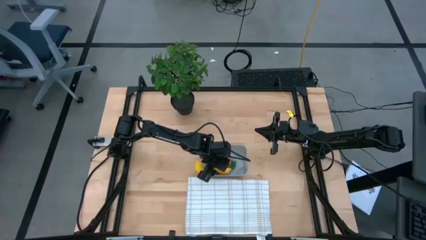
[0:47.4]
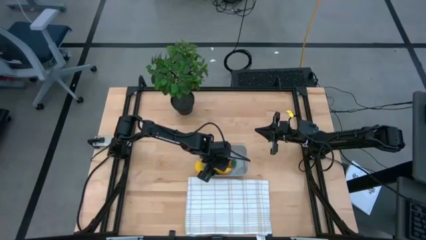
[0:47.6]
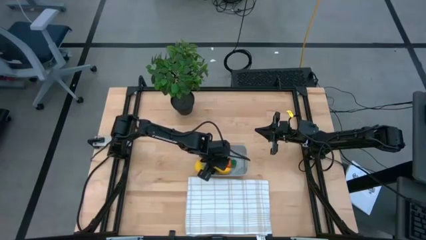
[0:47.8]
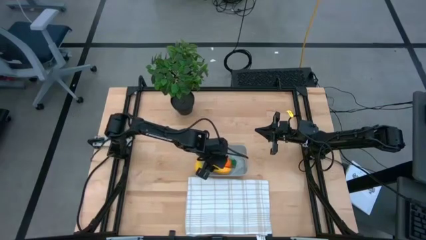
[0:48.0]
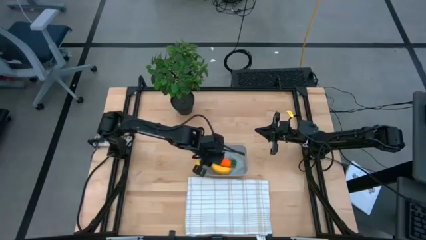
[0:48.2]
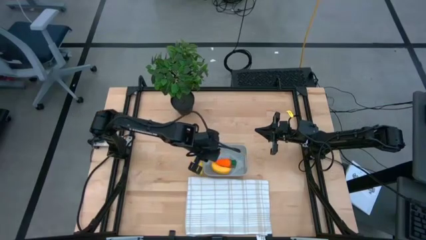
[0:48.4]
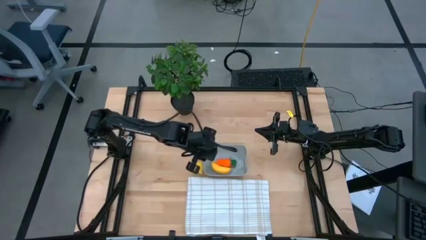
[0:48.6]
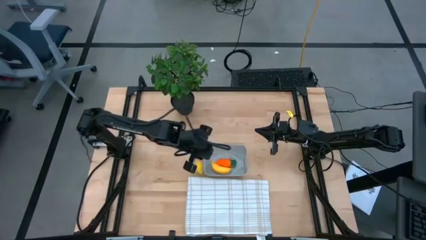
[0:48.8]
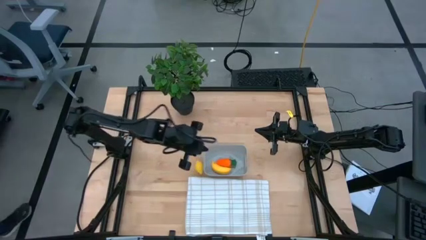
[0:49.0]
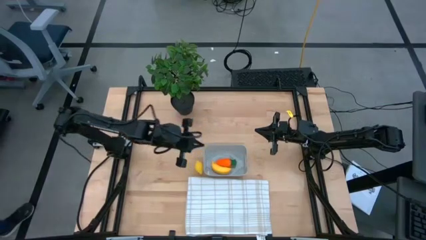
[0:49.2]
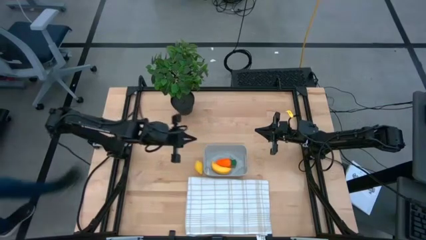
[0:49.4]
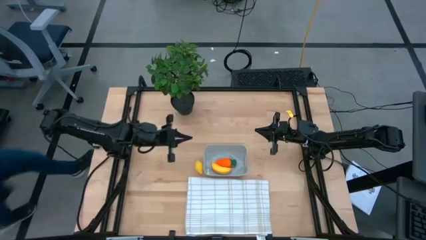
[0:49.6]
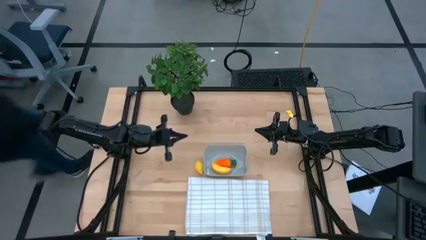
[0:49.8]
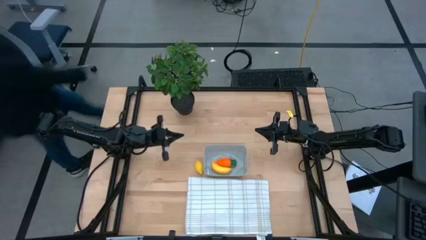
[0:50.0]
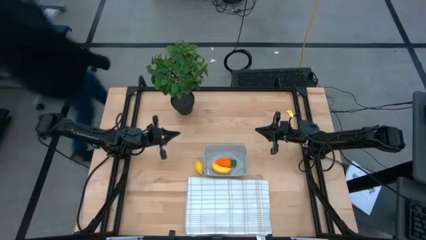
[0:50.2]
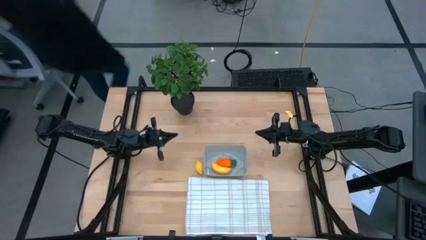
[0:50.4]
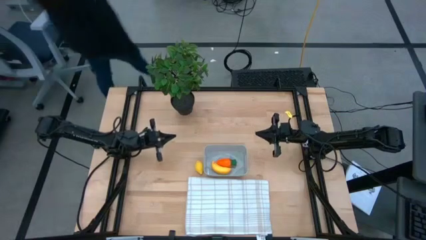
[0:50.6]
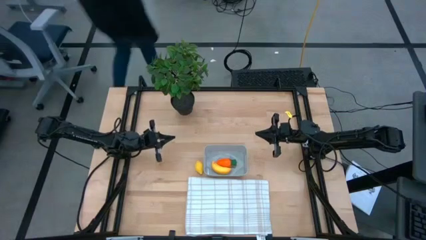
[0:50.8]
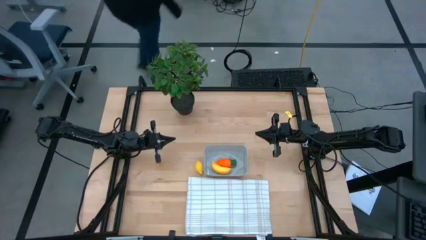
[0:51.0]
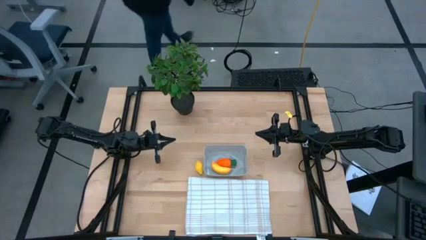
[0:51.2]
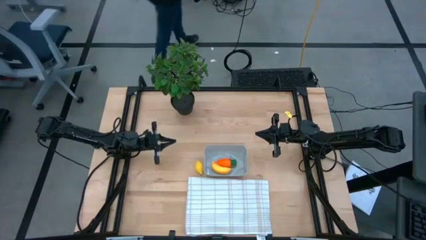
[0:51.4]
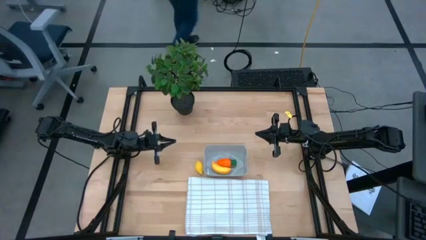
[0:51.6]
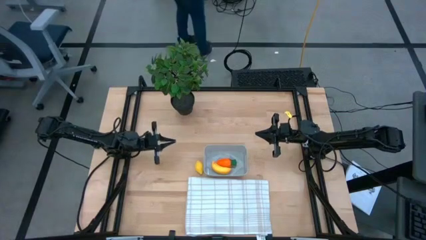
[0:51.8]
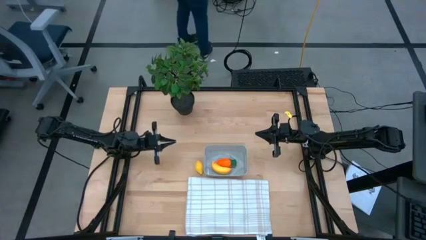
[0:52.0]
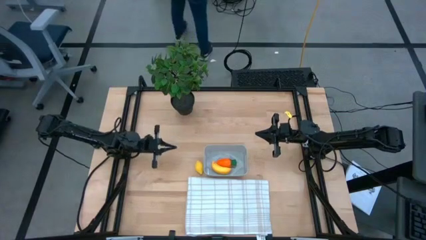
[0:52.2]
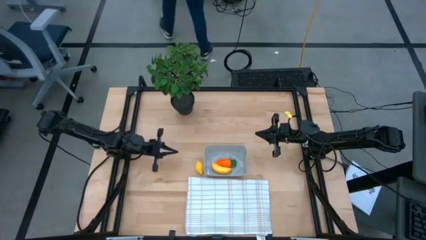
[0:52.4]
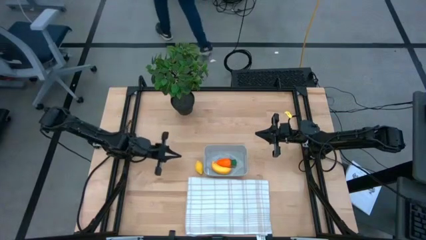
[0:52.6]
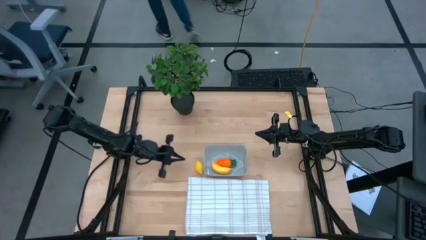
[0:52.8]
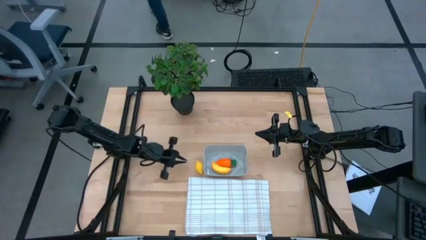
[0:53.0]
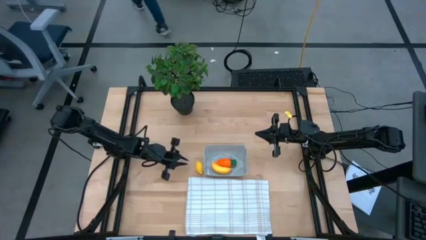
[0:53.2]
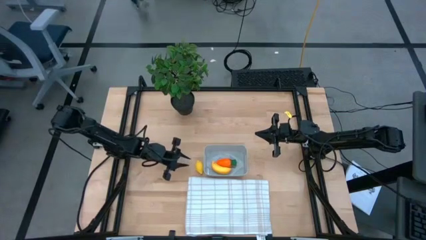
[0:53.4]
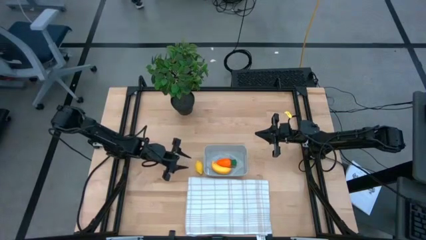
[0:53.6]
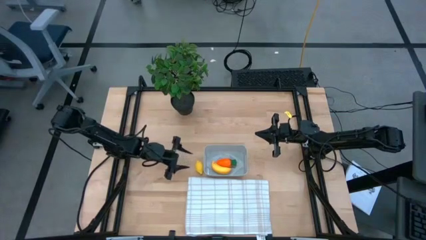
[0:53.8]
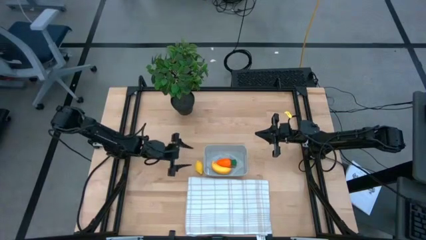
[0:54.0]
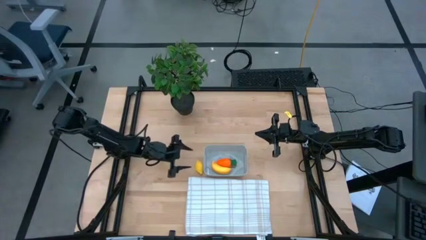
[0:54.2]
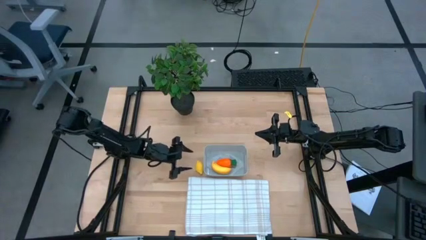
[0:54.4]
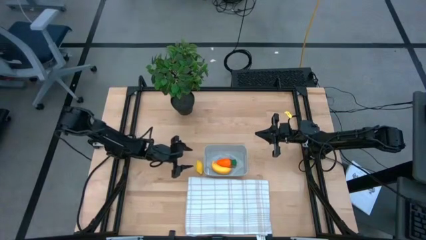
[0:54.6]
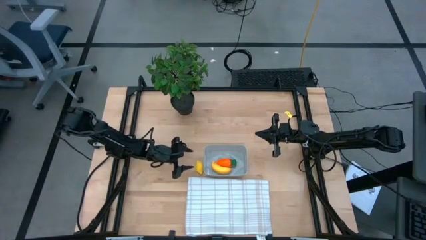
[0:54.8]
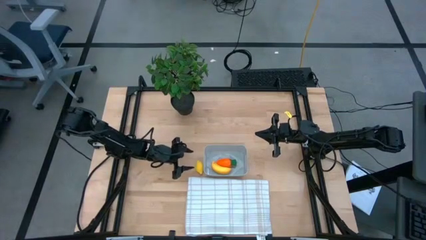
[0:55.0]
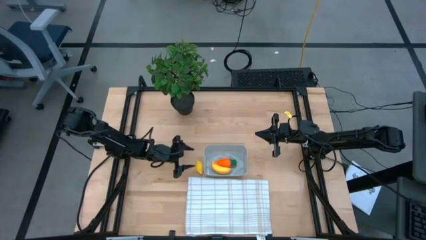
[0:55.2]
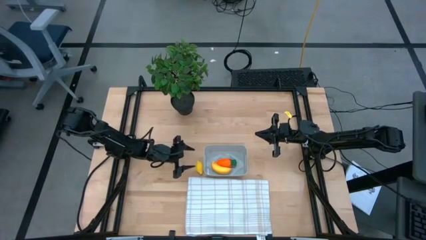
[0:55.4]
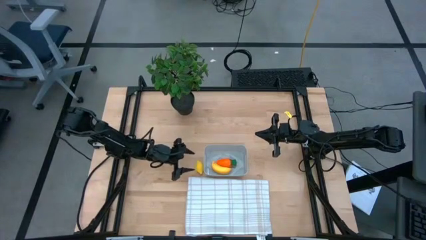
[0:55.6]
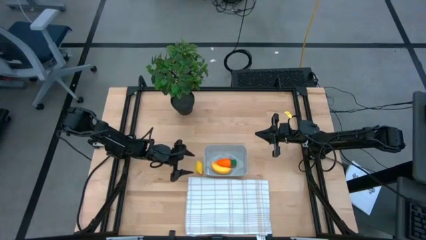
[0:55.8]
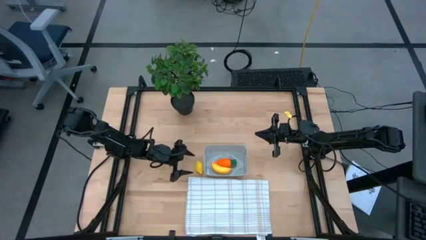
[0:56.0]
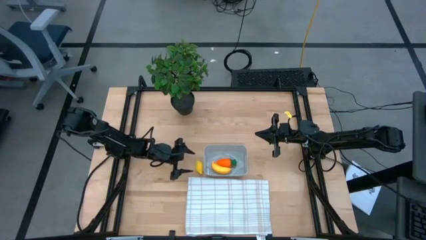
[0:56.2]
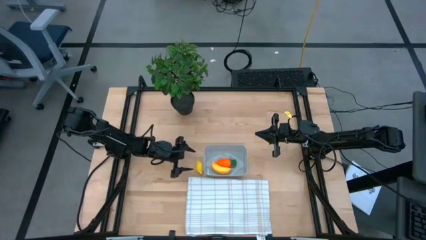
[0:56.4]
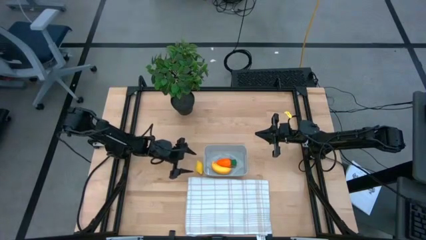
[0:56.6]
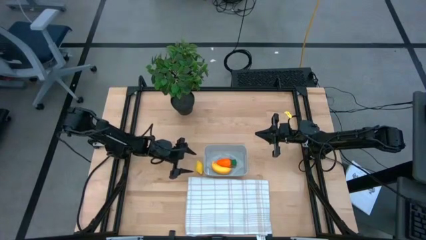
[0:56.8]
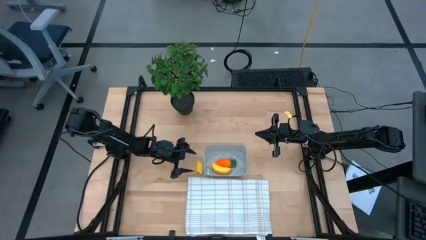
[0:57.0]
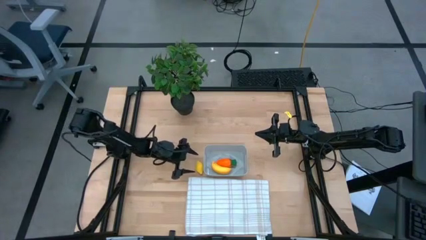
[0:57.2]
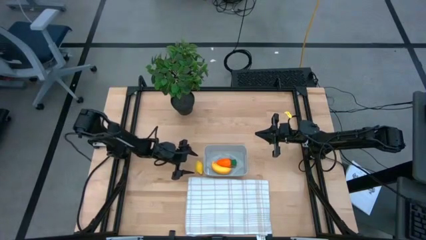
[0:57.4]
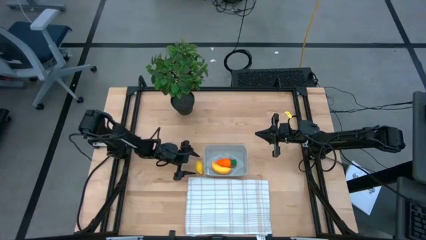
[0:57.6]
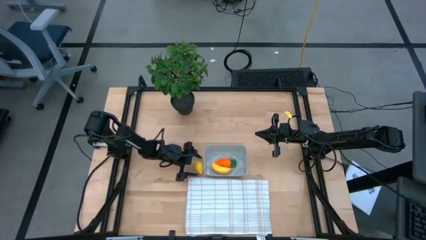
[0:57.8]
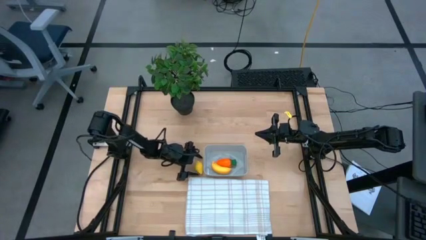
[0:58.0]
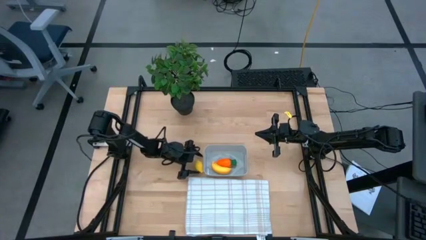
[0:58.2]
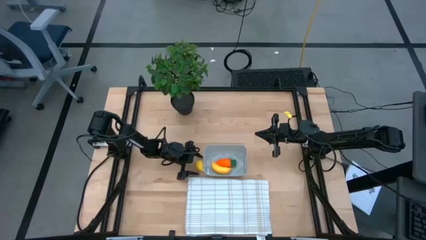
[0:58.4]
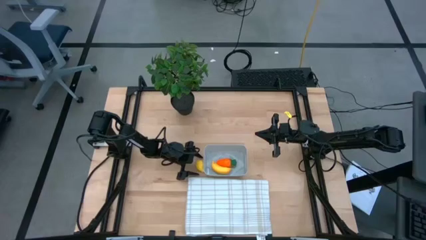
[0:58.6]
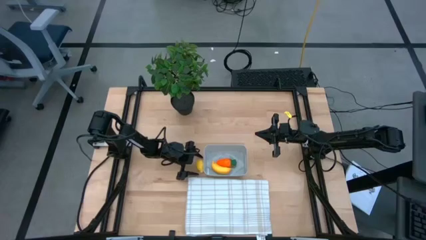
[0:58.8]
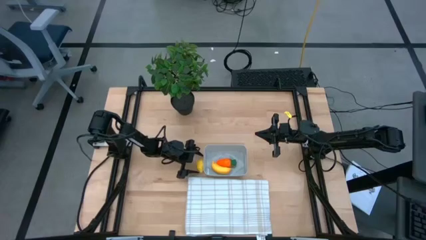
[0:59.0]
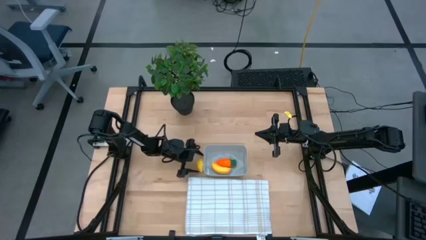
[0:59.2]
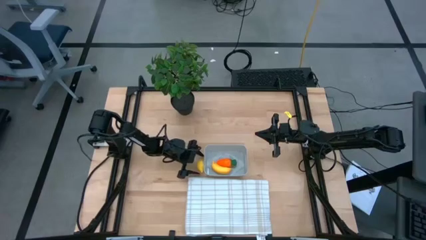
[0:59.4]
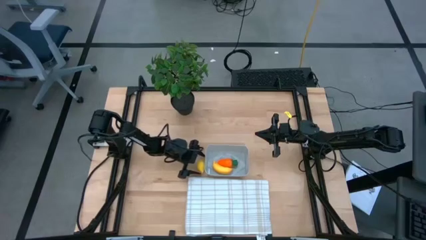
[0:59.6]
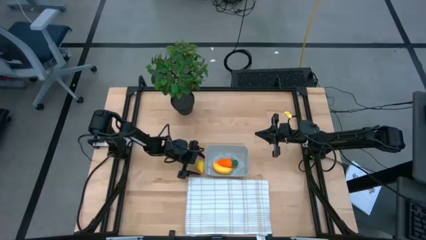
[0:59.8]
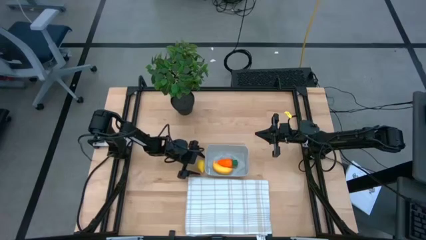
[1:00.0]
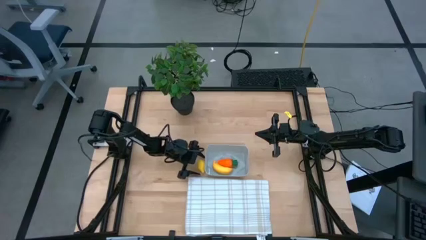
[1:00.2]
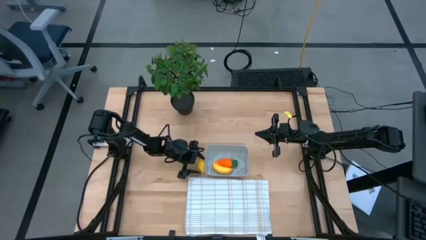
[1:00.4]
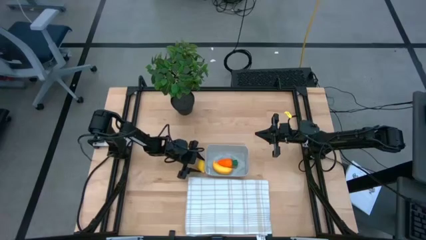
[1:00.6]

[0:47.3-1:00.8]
Task: Pick and placing Produce into tupperware
Put the lemon into the gray bin
